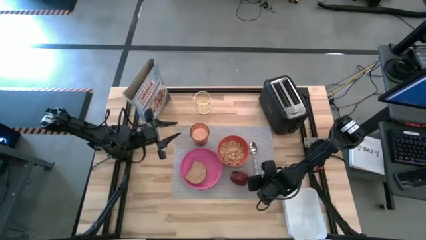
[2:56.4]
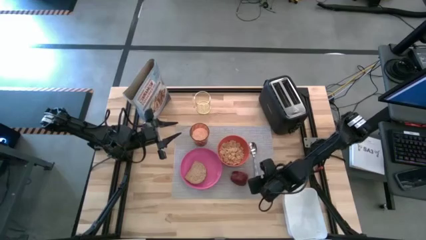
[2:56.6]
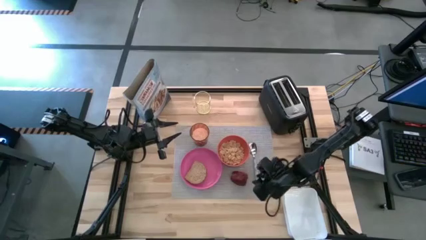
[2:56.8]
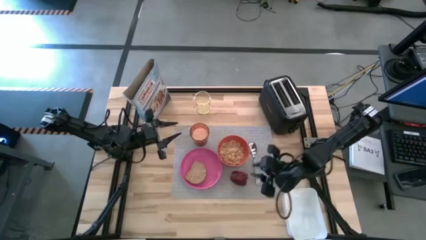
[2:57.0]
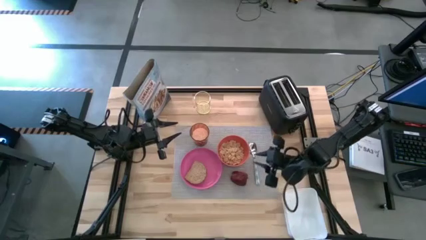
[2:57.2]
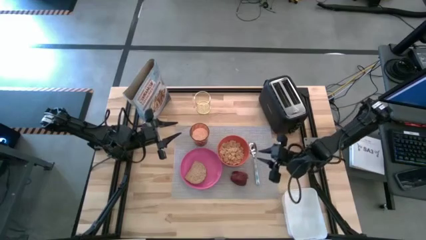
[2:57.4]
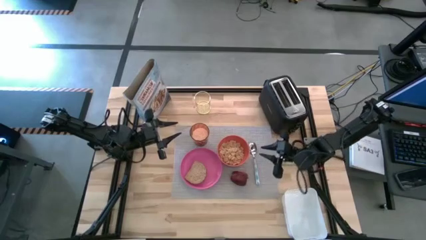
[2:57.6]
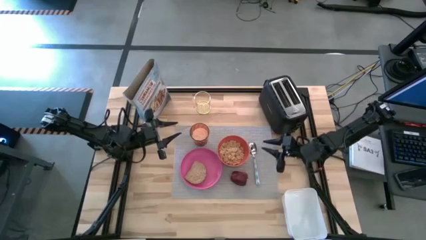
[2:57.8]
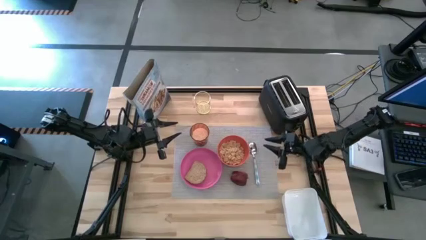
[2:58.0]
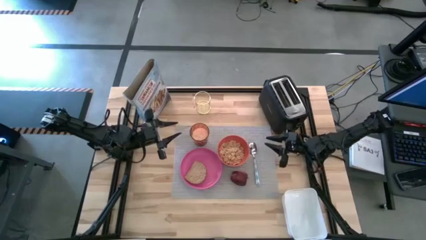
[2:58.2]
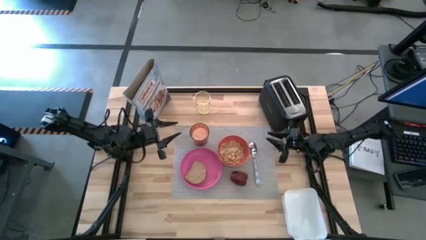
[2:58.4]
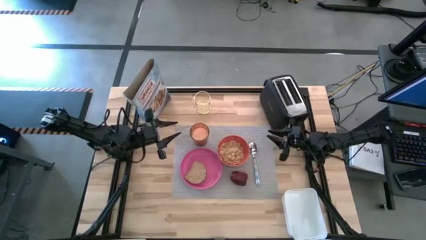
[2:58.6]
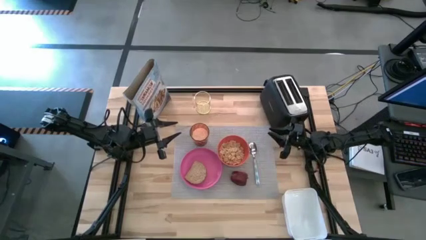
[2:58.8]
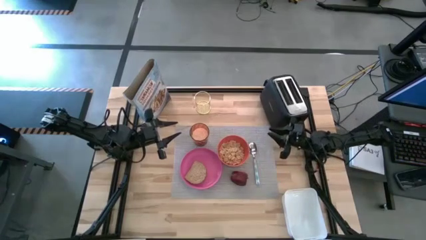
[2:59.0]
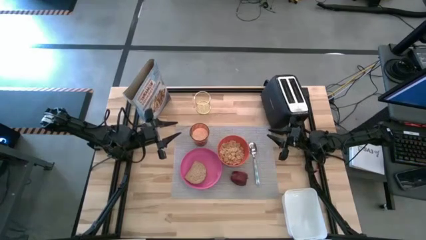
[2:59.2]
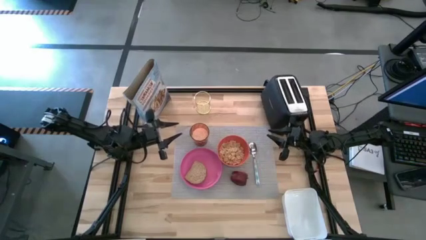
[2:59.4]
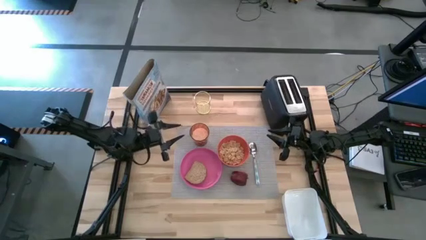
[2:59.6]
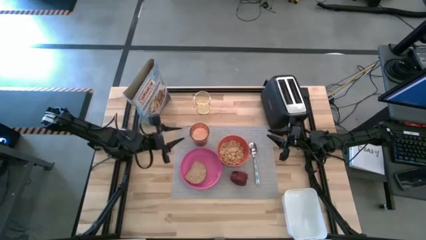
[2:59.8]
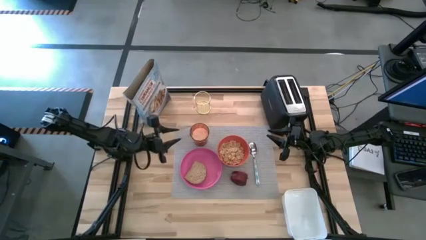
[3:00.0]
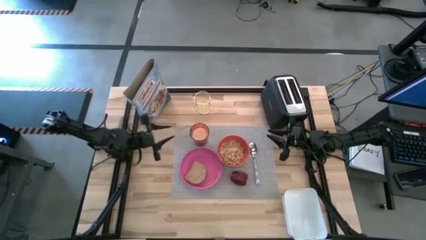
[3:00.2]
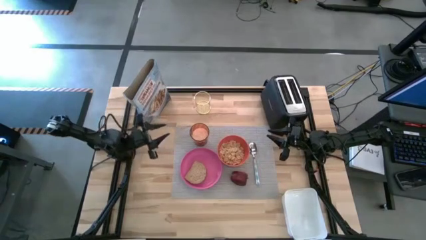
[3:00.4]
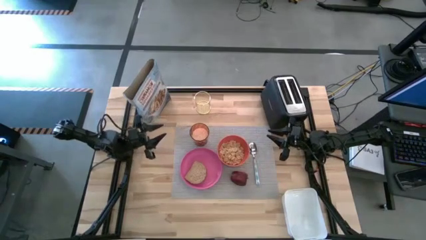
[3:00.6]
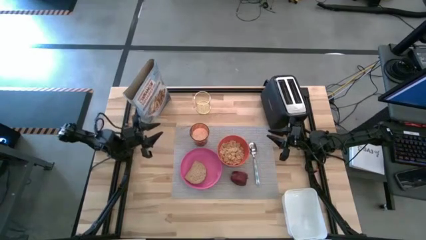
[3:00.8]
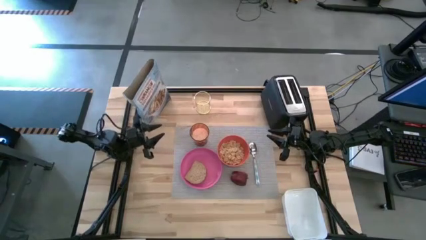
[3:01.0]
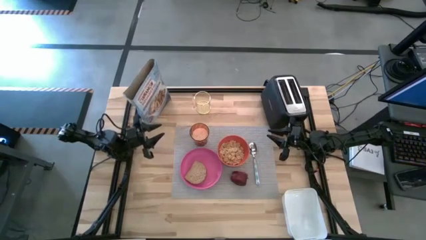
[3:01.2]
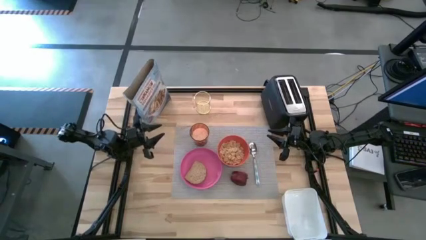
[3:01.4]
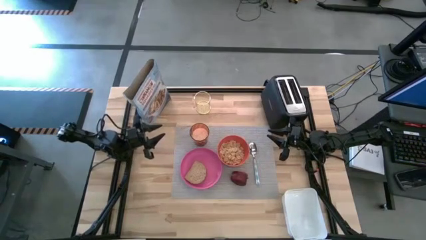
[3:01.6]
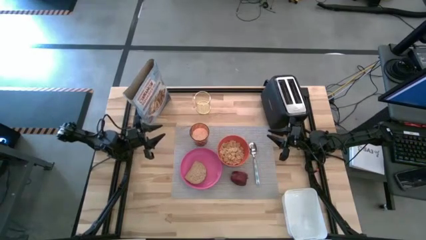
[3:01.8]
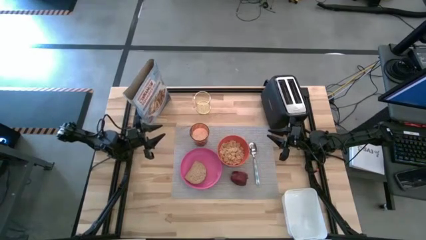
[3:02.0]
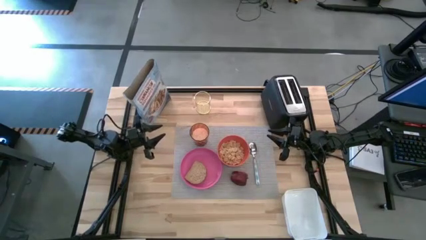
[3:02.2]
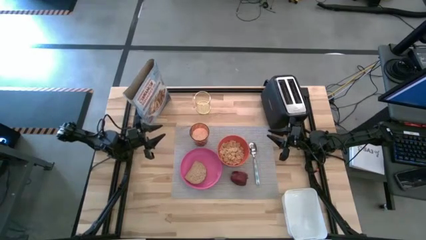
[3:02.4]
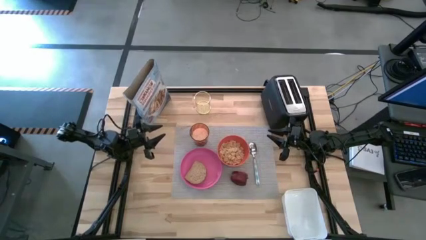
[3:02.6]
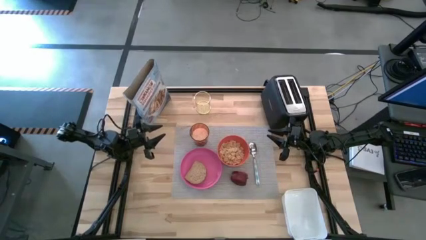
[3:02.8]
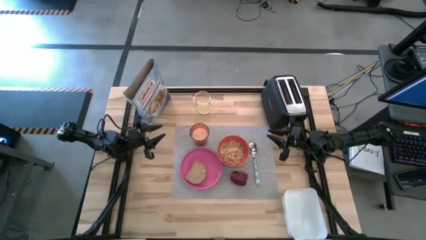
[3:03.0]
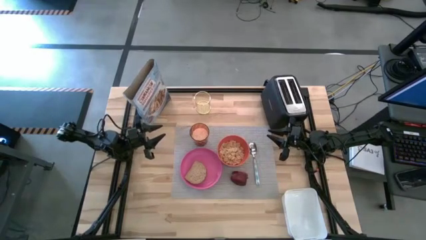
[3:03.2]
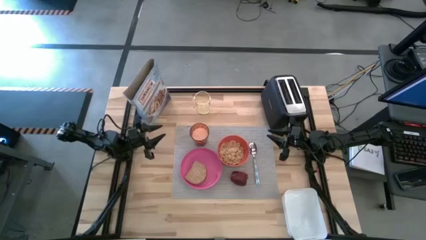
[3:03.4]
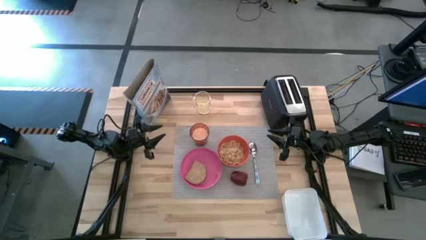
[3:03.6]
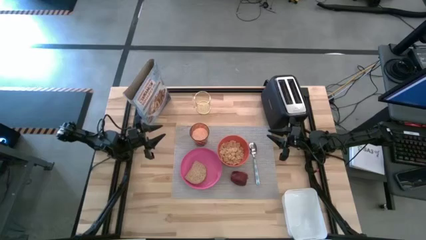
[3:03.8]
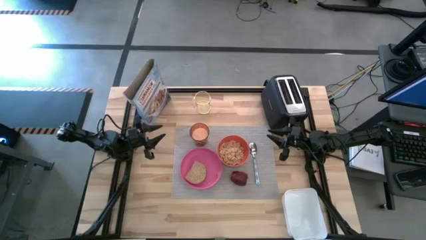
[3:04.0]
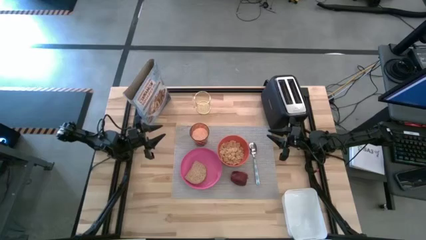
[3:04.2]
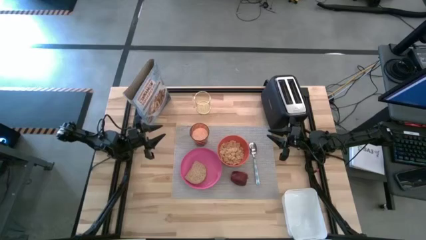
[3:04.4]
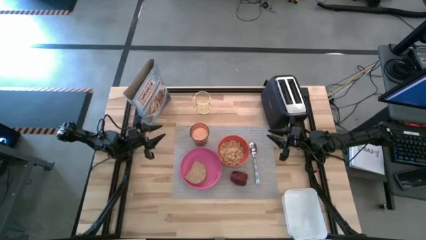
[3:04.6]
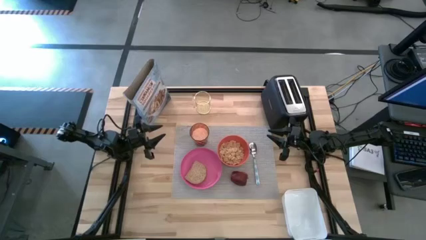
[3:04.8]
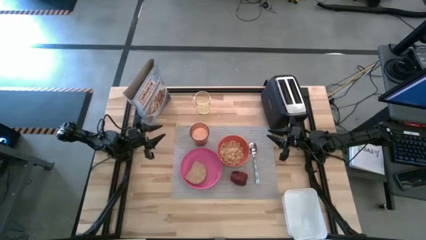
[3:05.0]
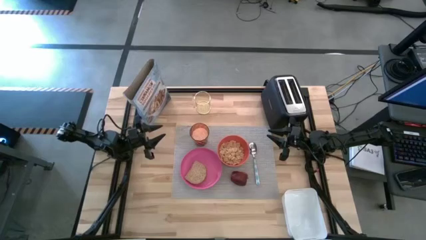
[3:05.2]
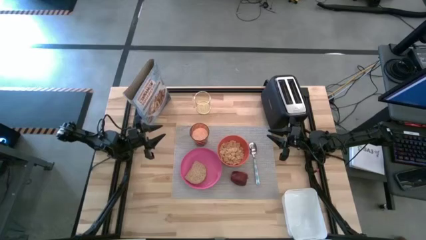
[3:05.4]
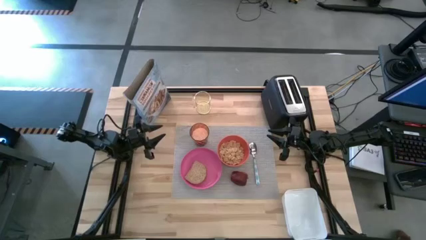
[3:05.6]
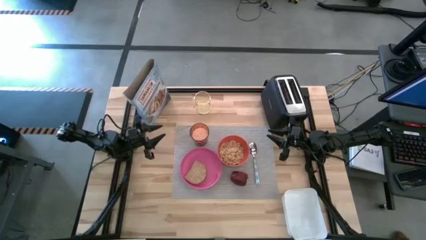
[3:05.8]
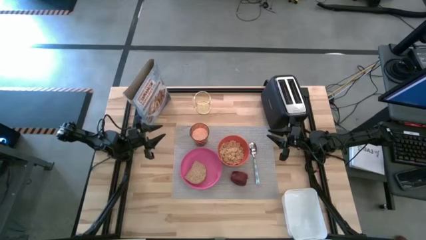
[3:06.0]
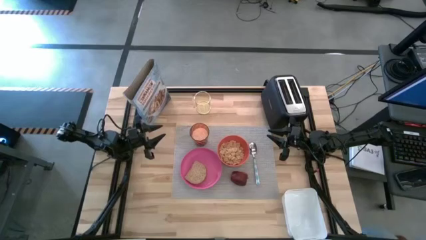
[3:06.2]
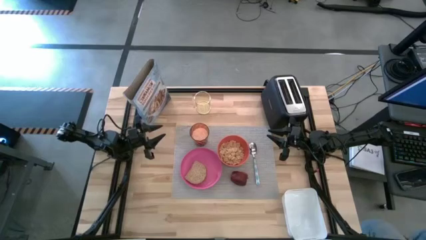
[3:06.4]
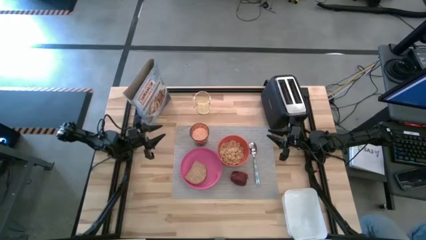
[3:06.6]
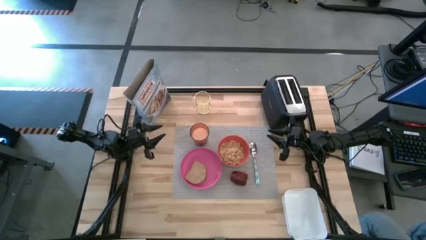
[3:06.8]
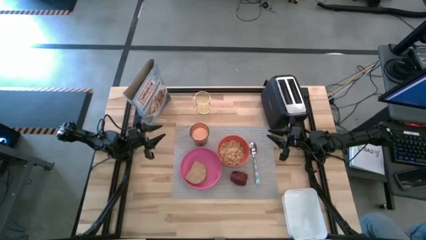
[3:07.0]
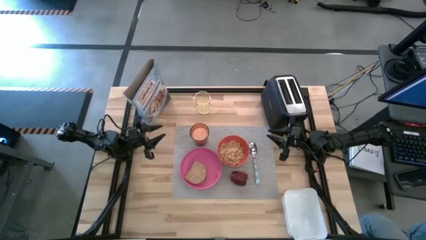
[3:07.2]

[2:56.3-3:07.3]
Task: Arrange a breakfast setting
Return to Home Position
